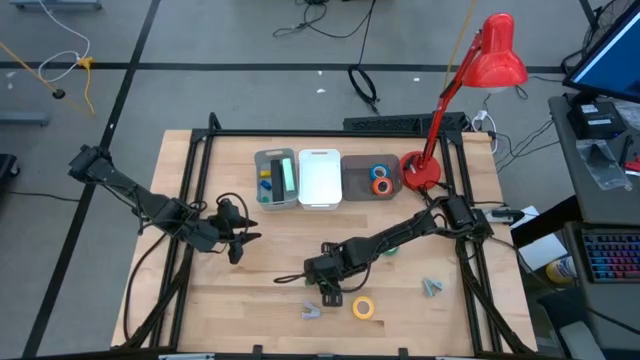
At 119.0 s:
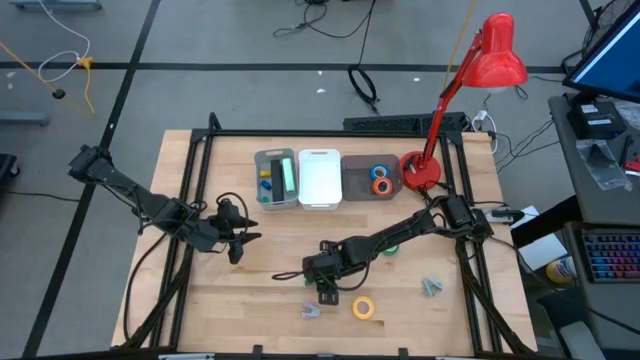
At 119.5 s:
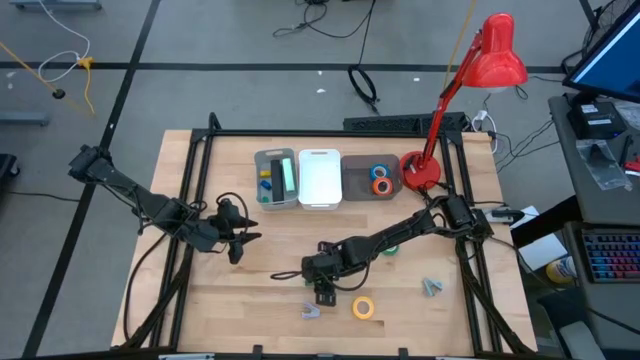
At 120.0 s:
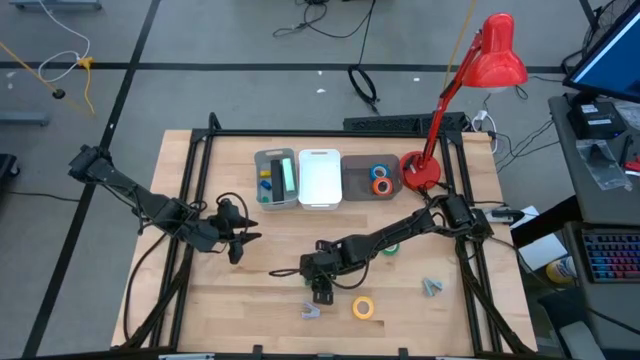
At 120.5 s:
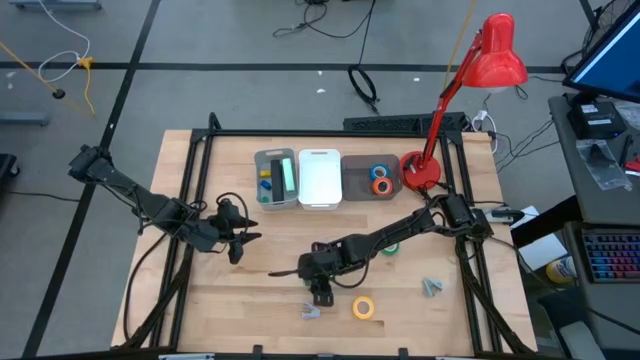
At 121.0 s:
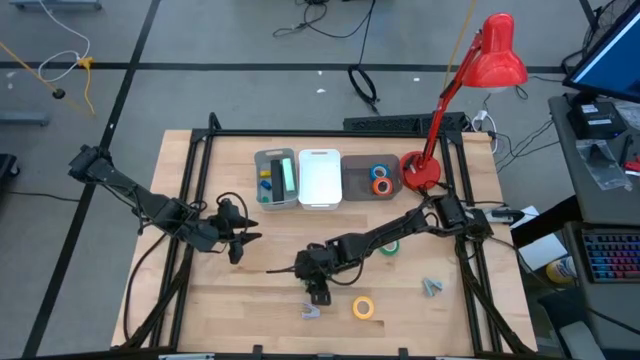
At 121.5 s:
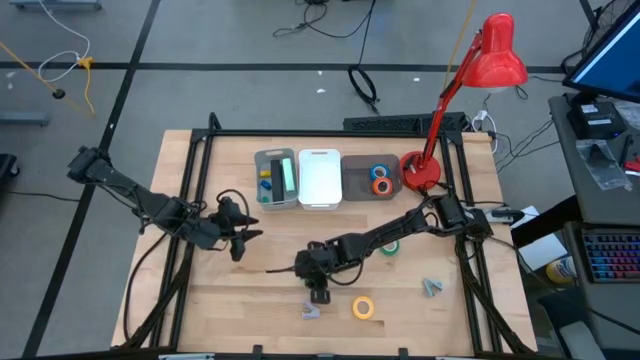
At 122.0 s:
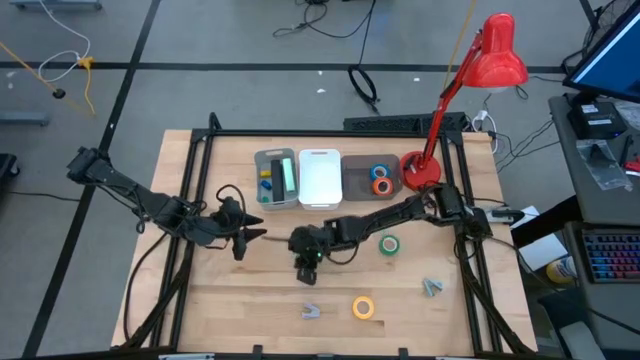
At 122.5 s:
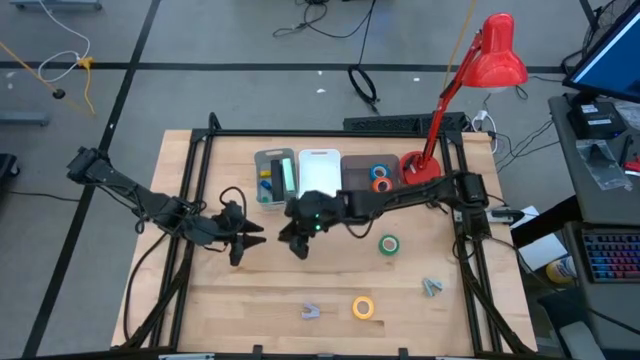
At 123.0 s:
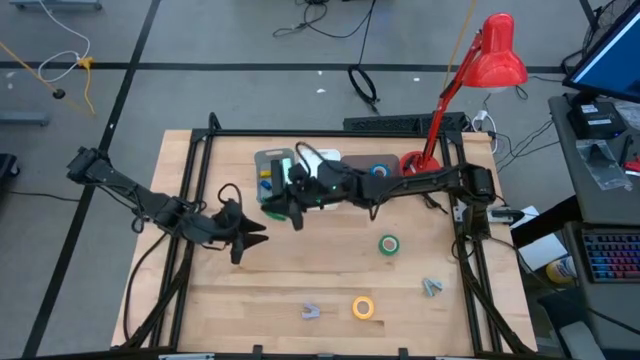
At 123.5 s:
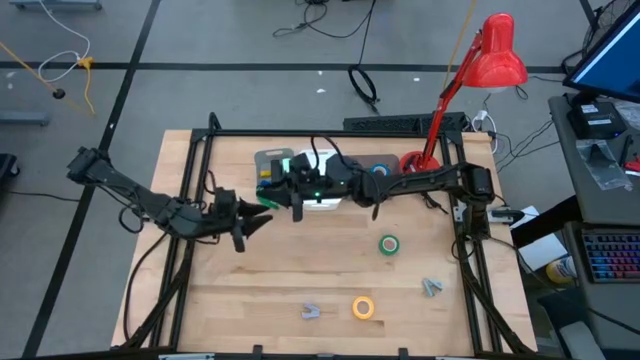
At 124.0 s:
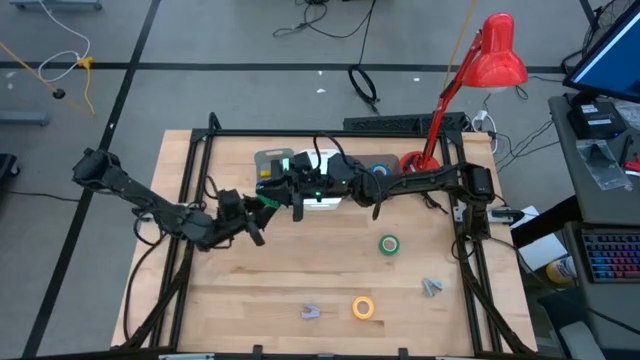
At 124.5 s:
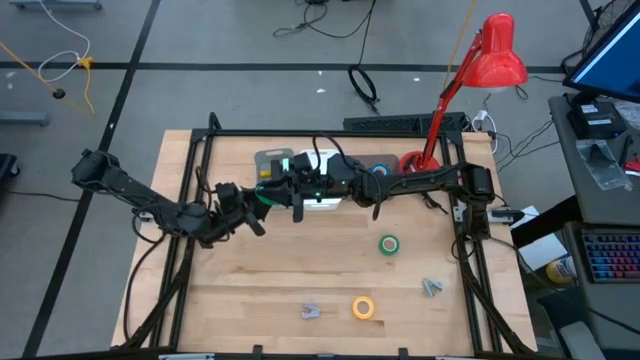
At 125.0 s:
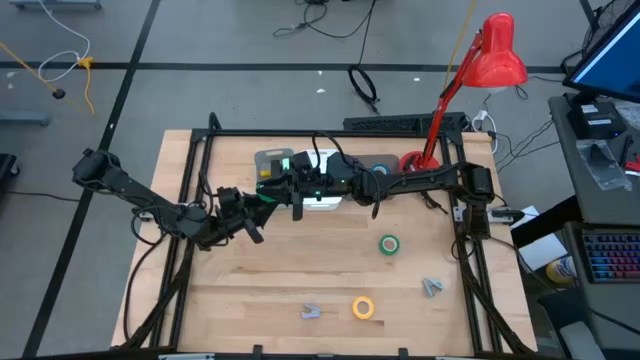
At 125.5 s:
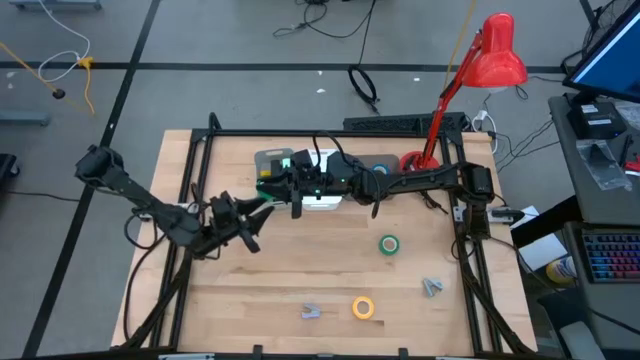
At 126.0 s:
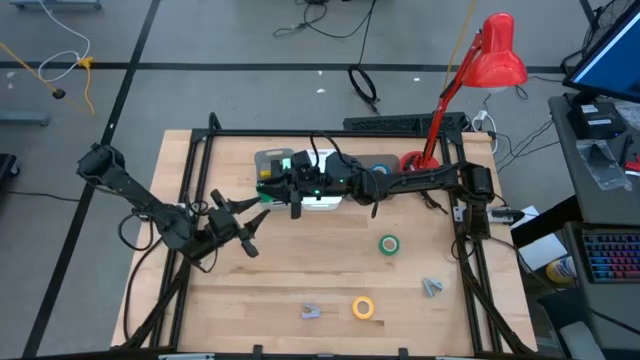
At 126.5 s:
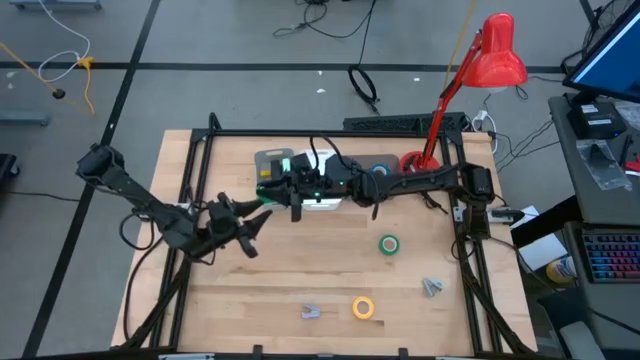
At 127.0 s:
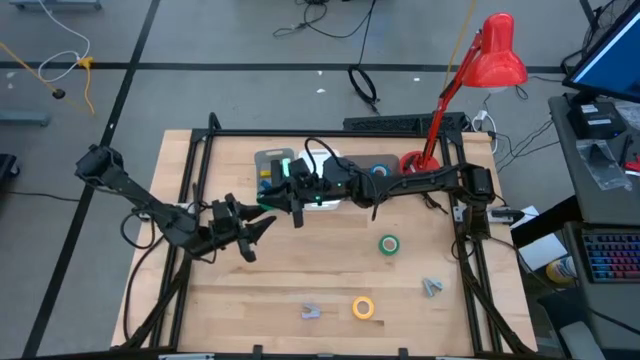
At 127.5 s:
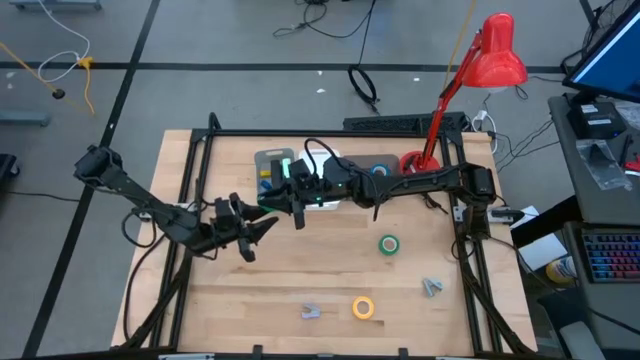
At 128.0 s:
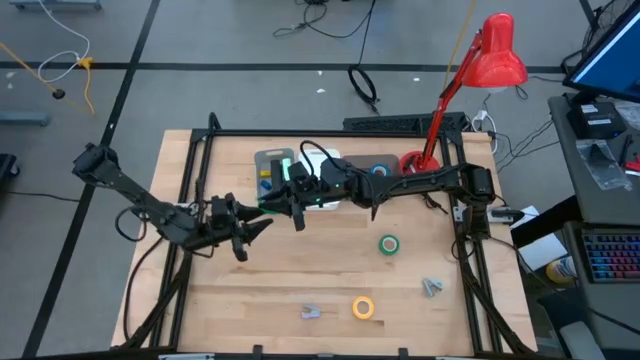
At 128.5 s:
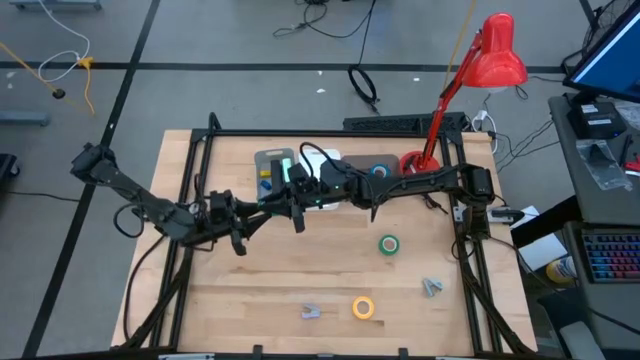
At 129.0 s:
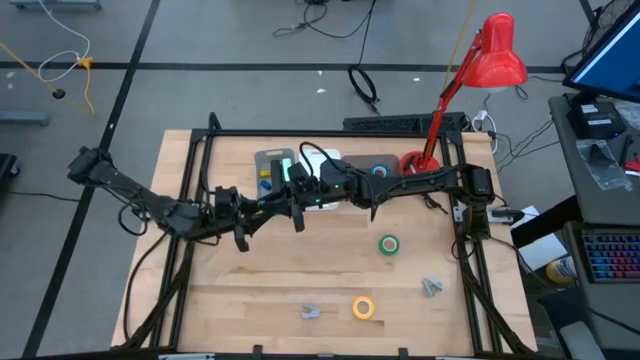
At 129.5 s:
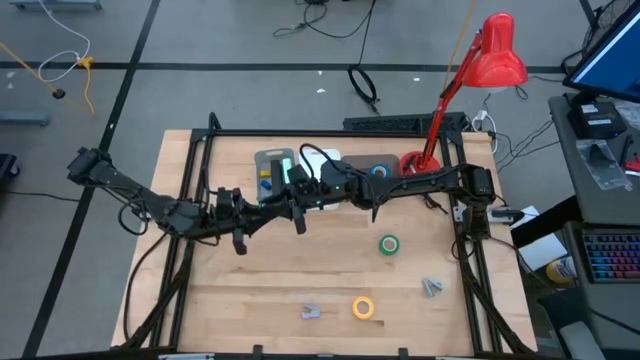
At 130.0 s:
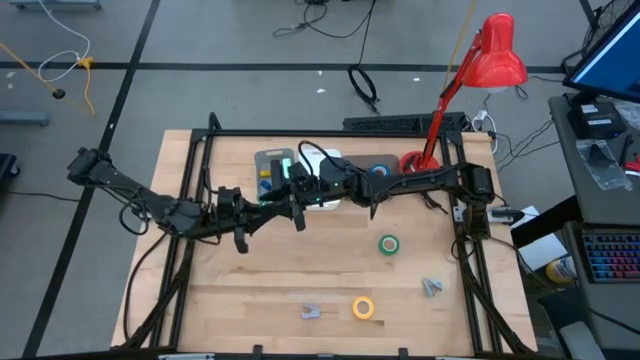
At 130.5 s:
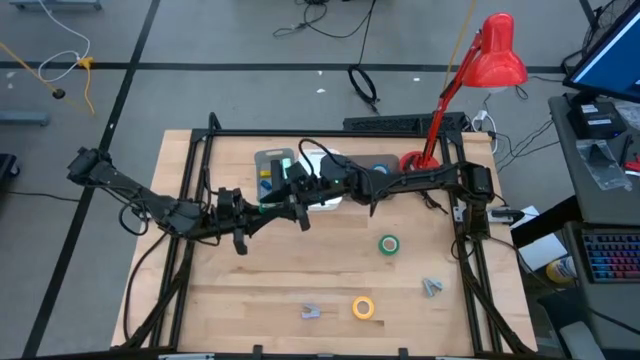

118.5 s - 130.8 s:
Task: Pick and place Stapler, Stapler remover, tape
Put the small green stapler into the grey bin

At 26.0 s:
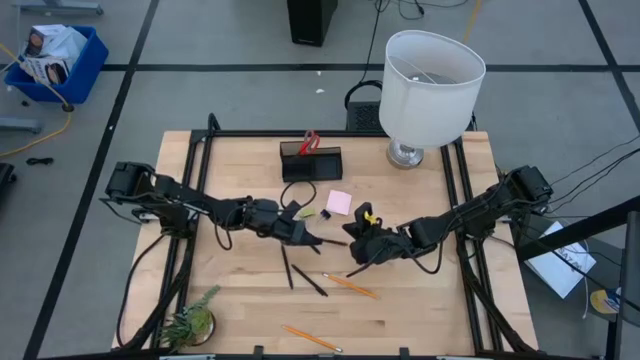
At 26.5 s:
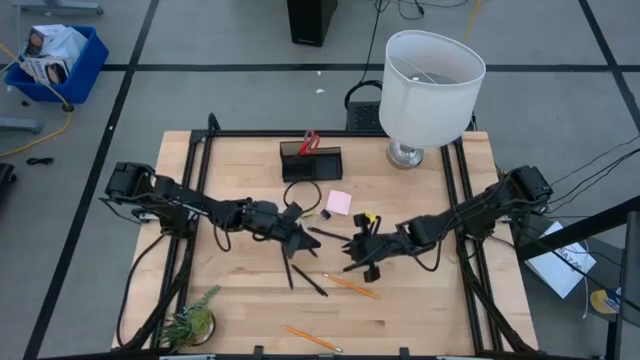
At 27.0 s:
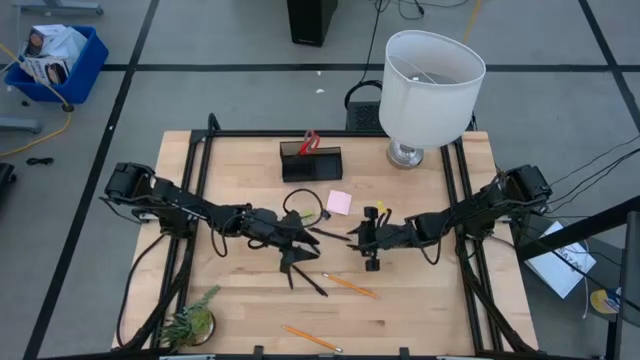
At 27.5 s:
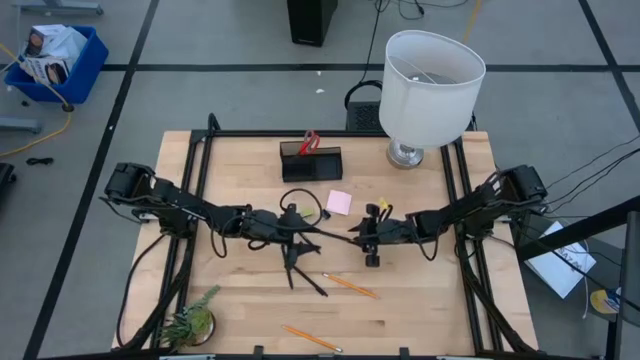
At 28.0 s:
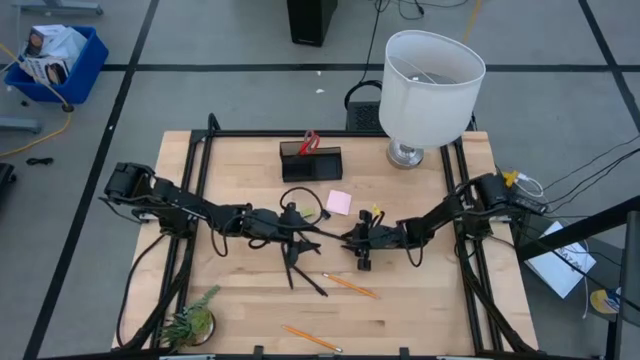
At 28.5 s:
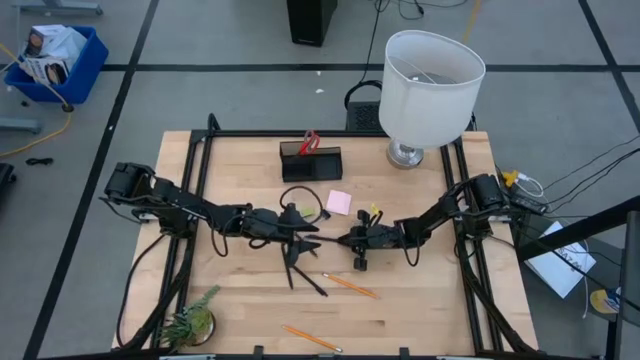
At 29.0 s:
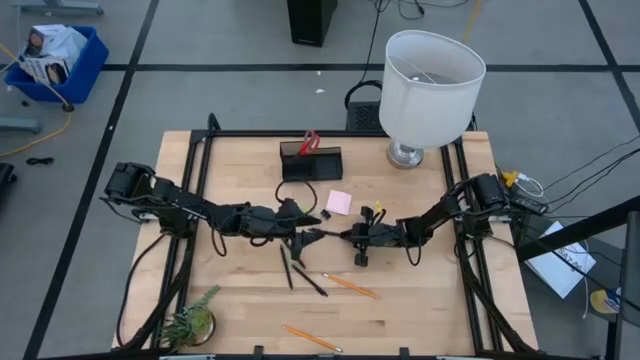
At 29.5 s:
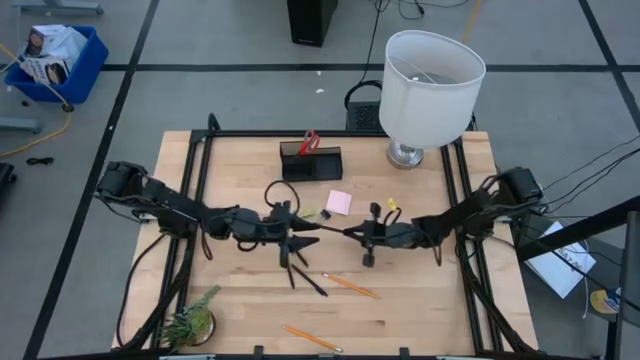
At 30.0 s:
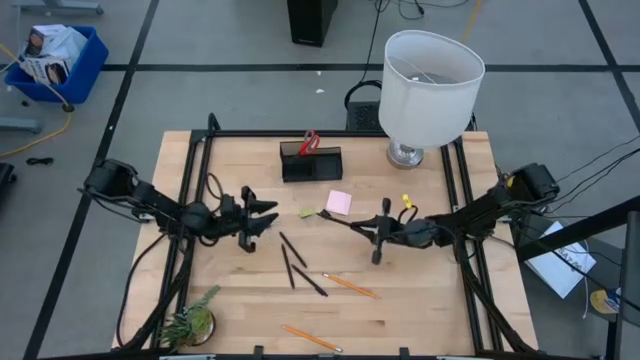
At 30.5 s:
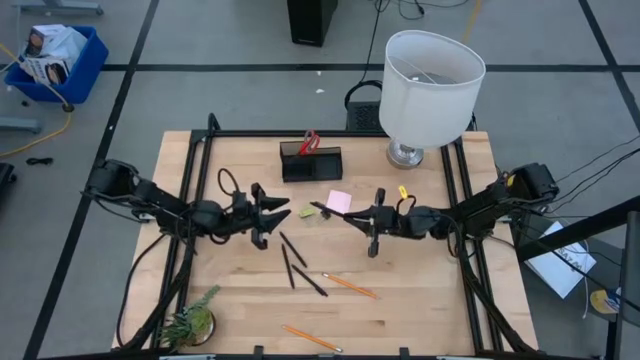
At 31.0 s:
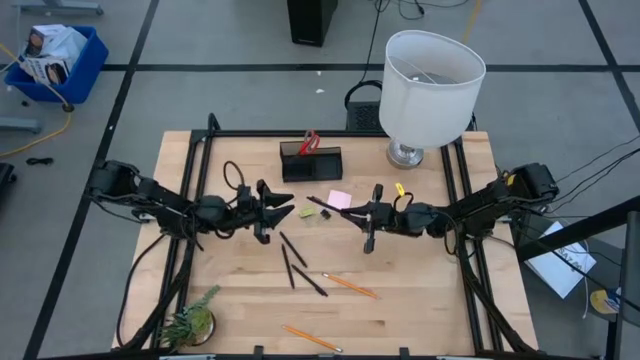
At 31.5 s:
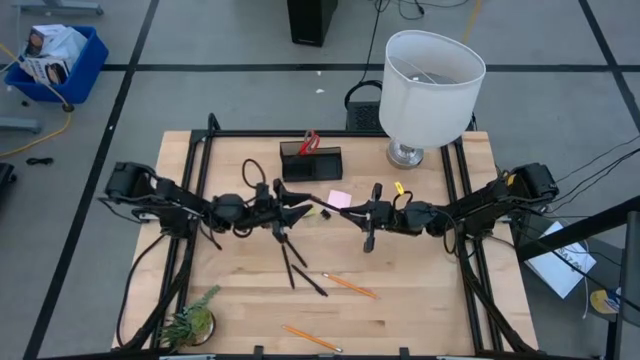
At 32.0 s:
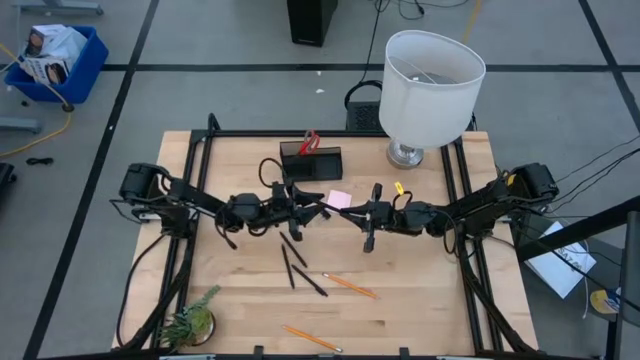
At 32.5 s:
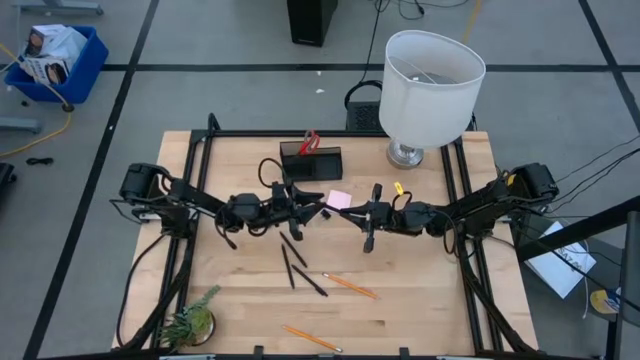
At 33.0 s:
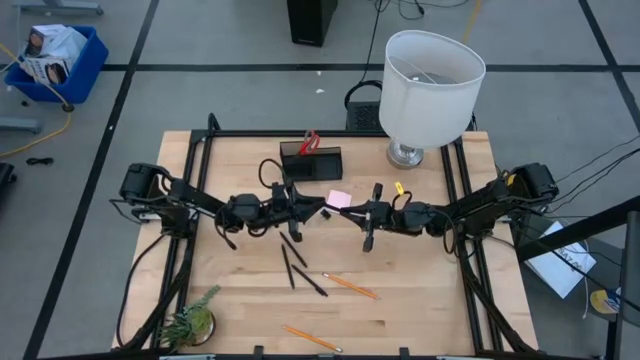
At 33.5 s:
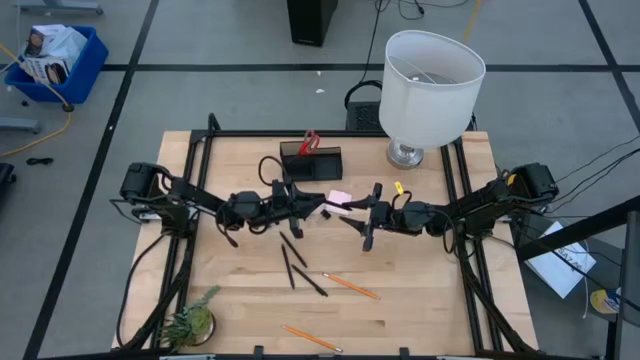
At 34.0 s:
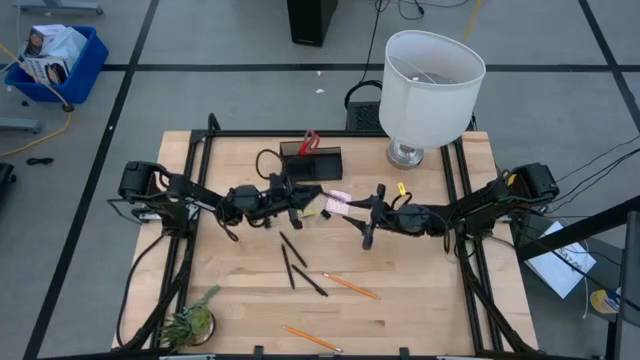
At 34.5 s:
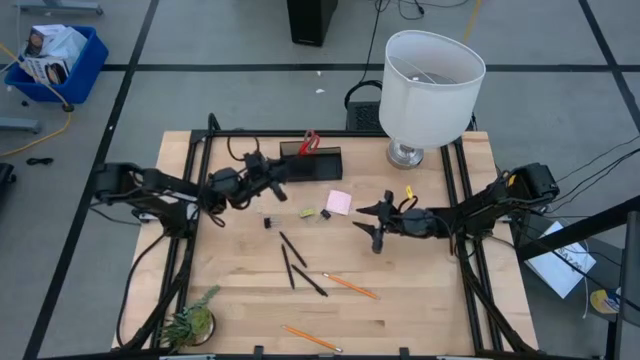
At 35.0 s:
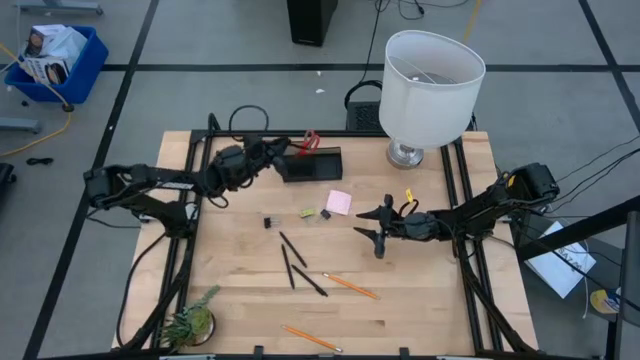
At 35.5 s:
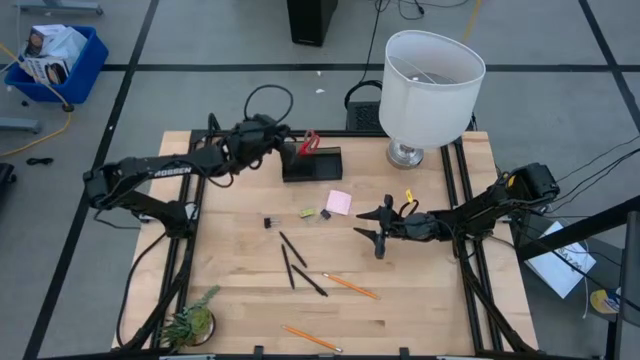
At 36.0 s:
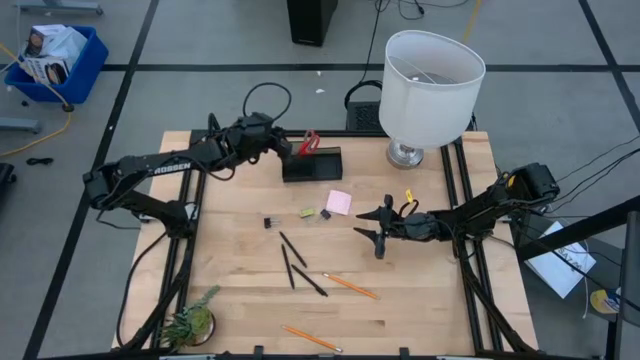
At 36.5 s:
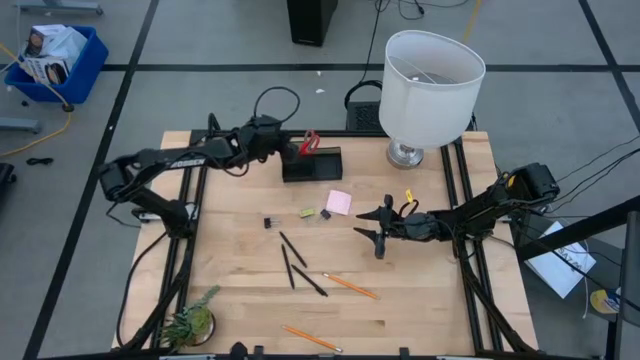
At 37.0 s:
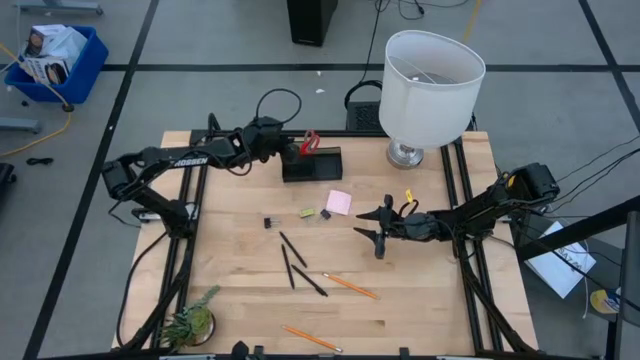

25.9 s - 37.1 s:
Task: Pick and place office supplies into organizer
Put the black pen into the black desk organizer
